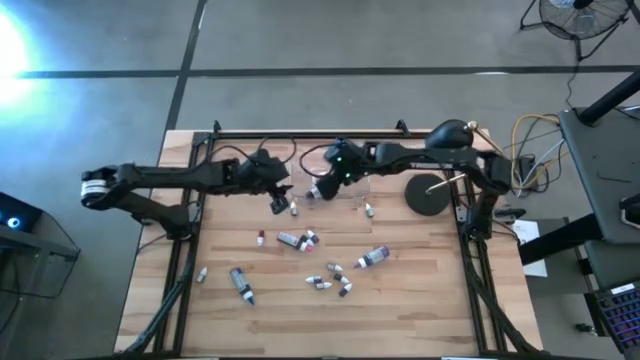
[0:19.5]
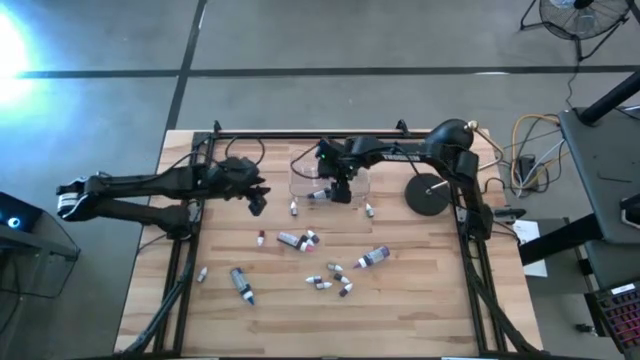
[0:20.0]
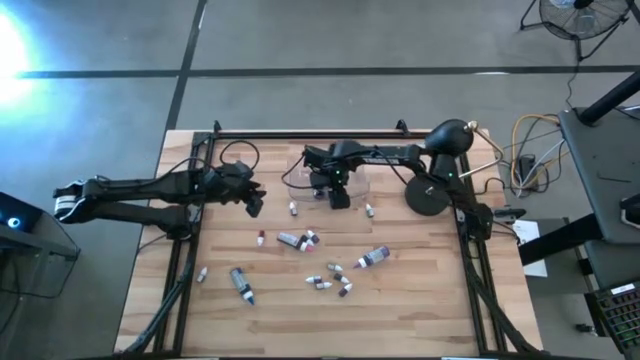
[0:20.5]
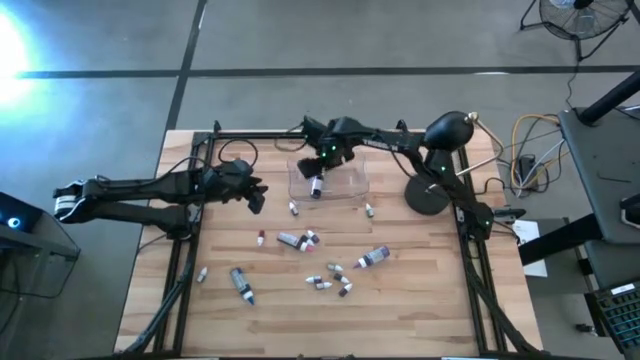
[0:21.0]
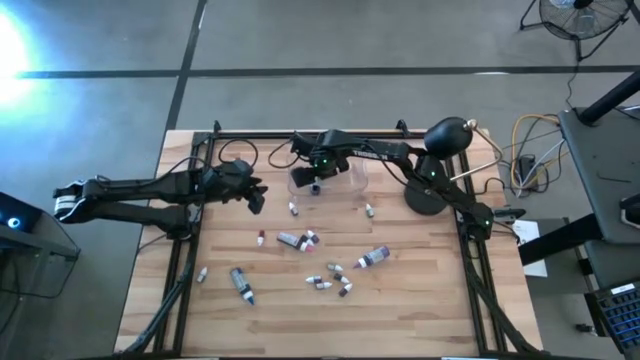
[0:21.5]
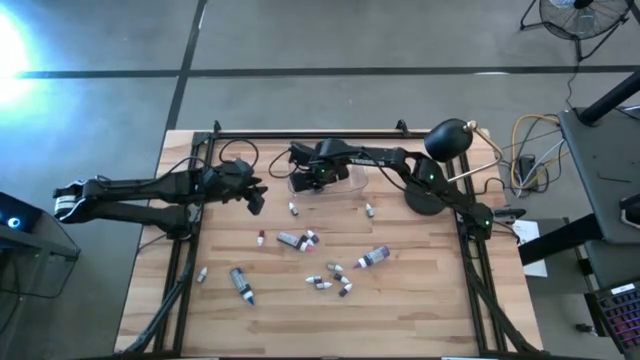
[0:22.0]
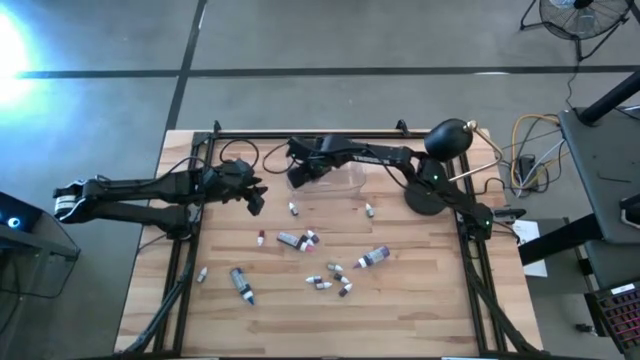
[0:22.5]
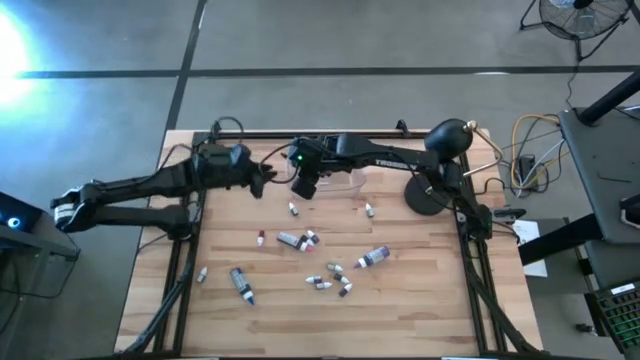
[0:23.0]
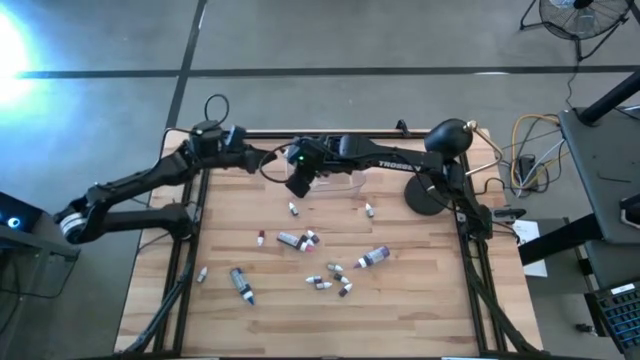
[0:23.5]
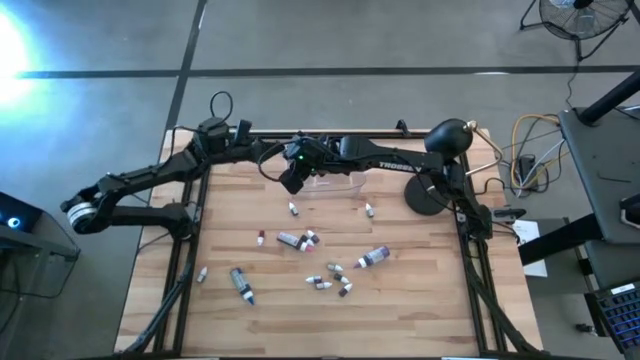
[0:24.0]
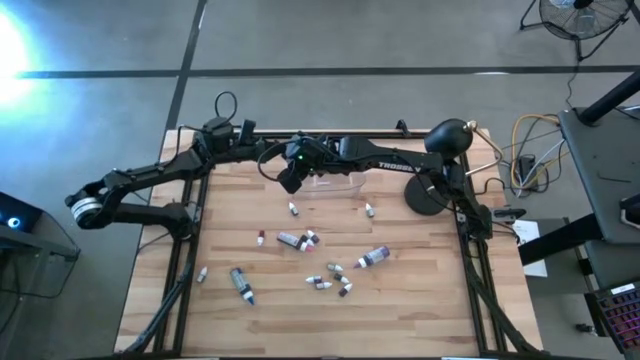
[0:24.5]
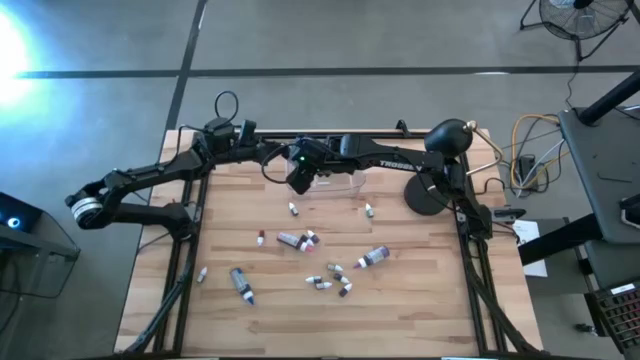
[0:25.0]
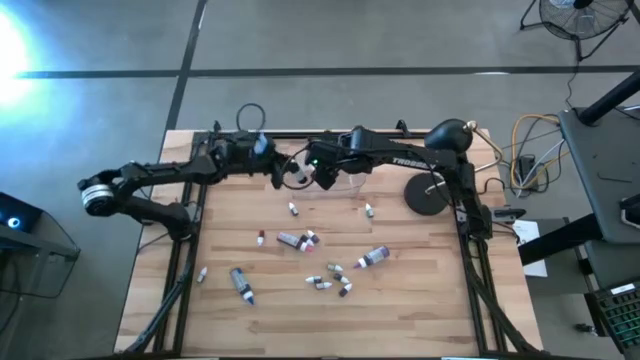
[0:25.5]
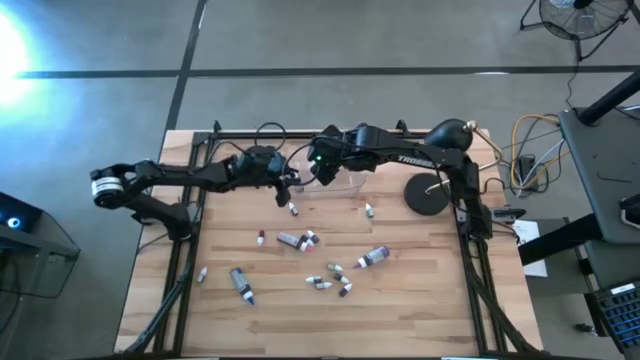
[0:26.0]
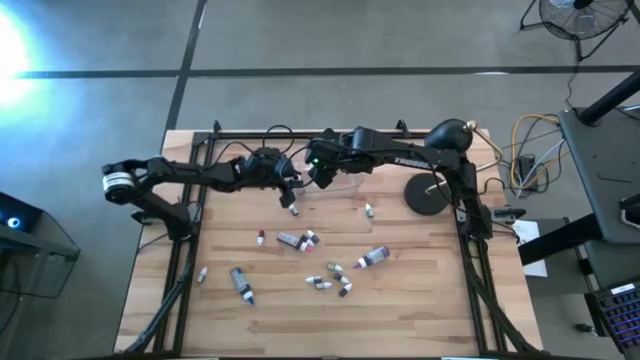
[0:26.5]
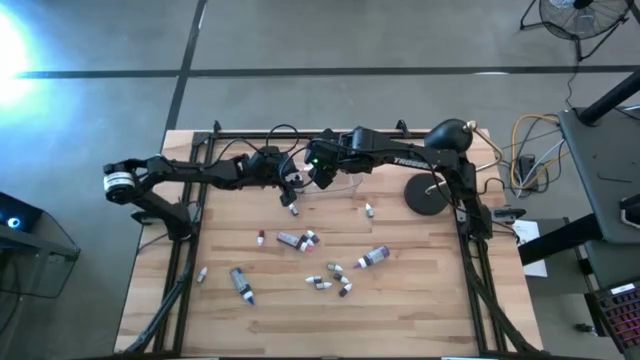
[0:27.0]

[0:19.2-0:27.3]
Task: Pick & Place food coloring
Put the large black food coloring bottle into the transparent bin

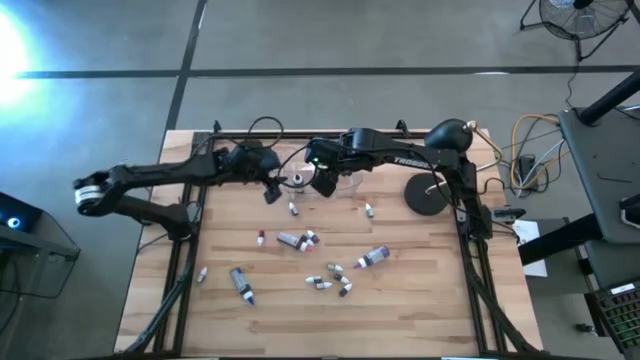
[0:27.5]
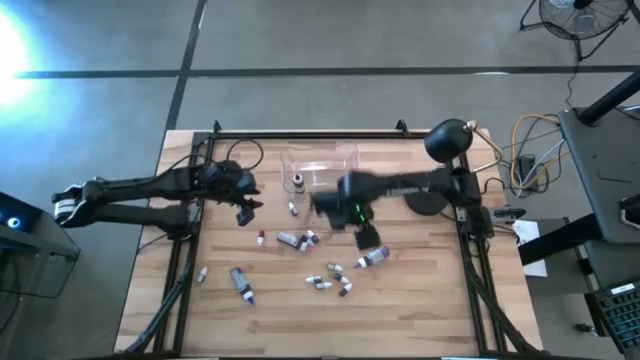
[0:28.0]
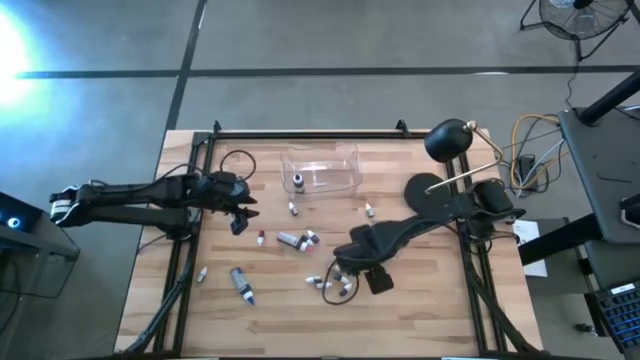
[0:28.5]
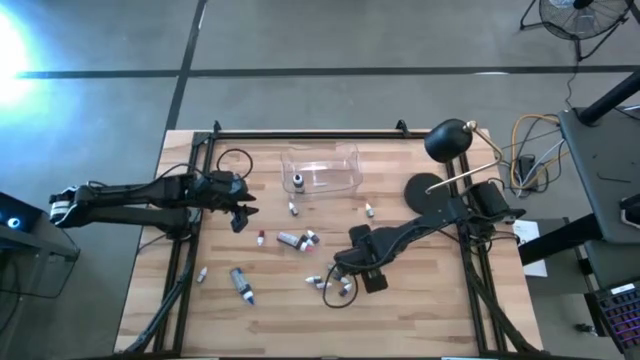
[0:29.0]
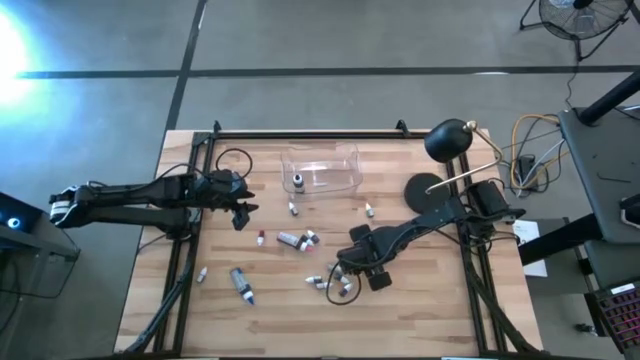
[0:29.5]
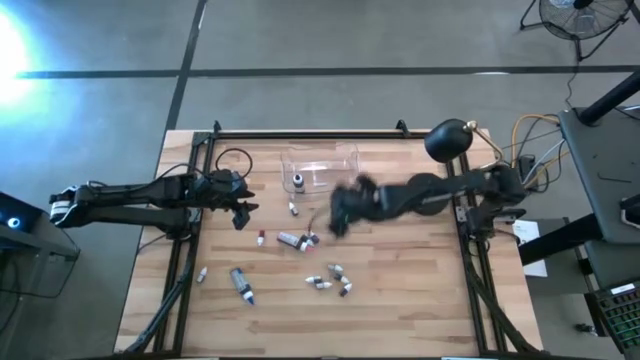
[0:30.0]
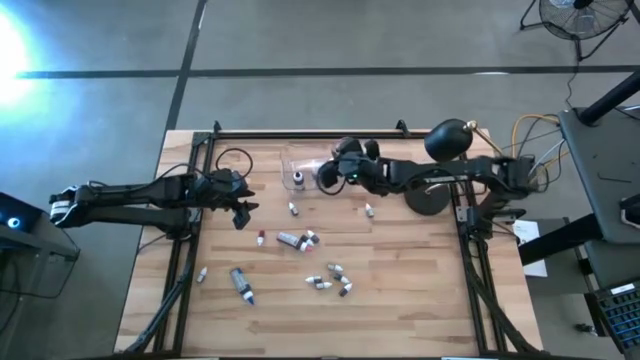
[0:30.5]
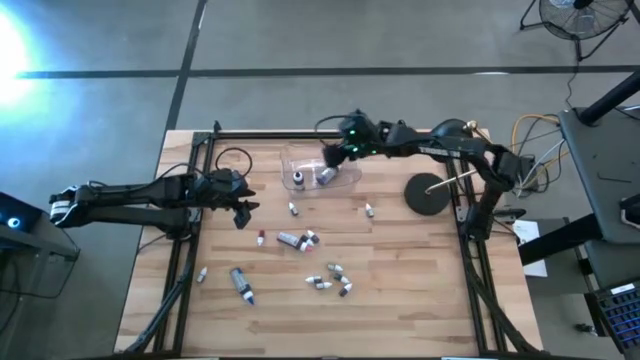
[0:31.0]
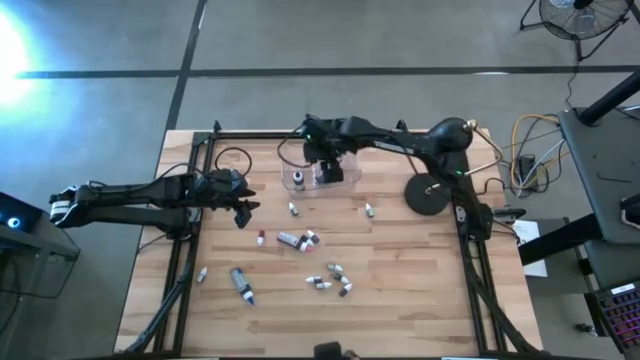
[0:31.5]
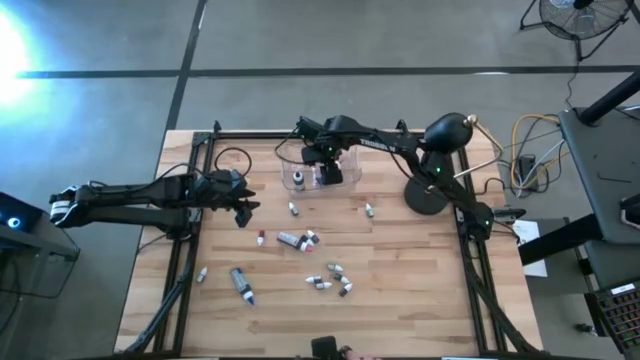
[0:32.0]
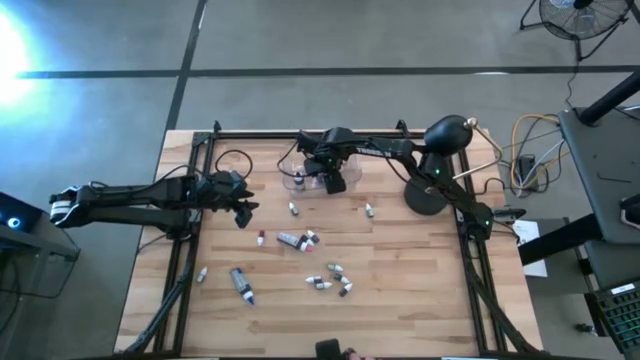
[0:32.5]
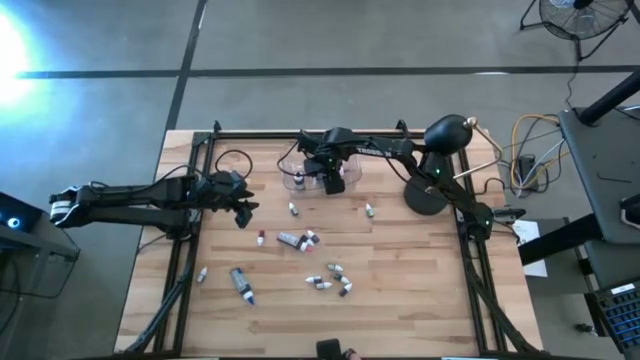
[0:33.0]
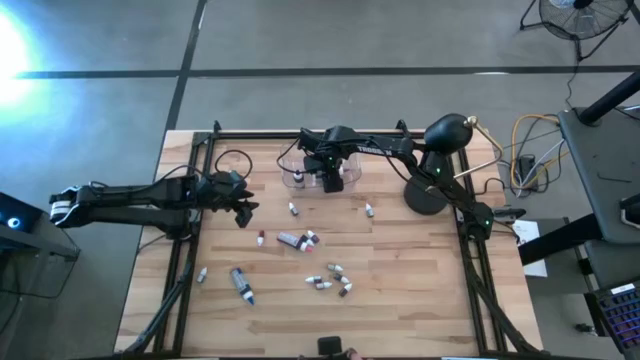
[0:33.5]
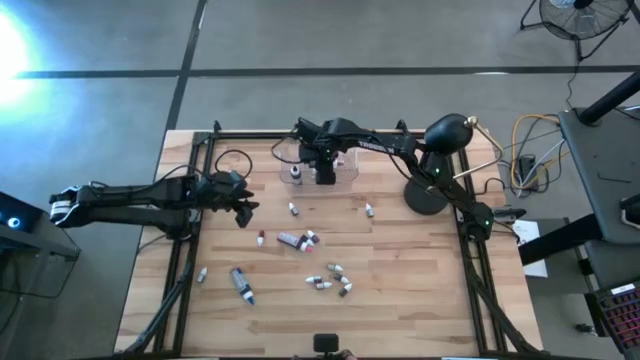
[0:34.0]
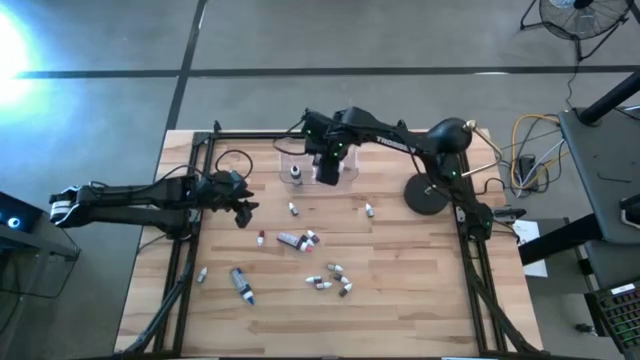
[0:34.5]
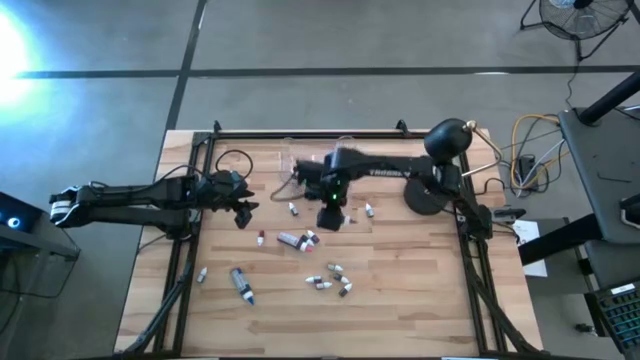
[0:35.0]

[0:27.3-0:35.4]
Put the large purple food coloring bottle into the transparent bin

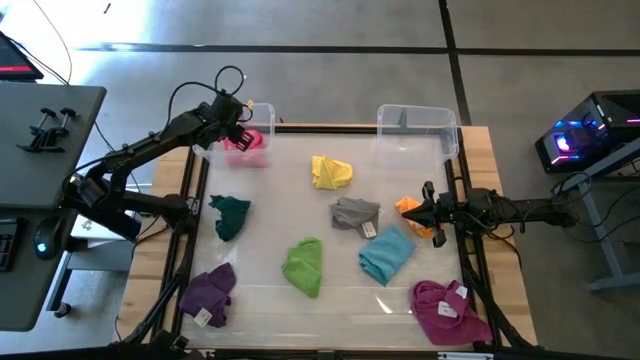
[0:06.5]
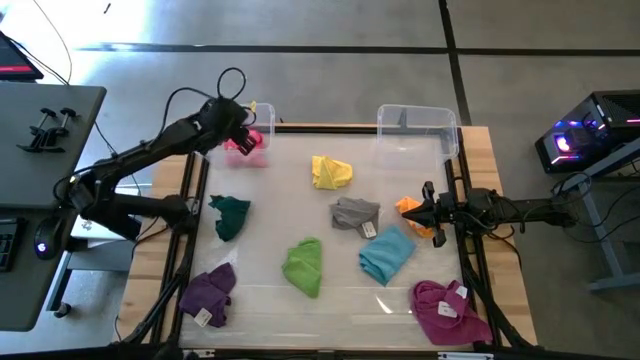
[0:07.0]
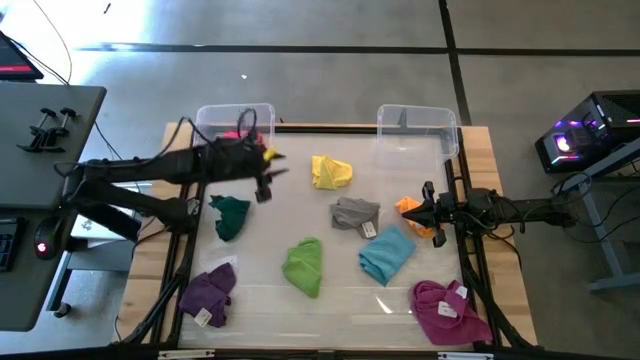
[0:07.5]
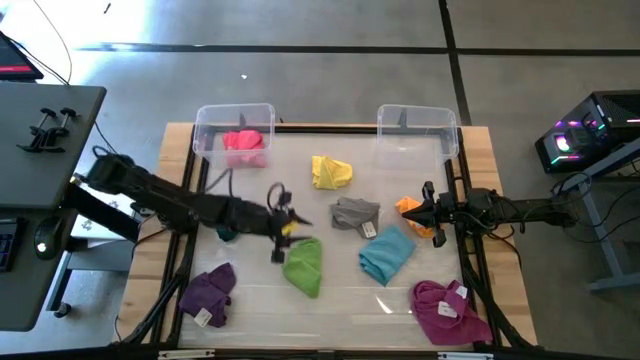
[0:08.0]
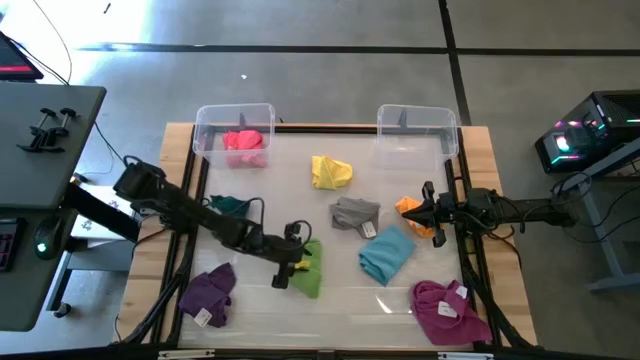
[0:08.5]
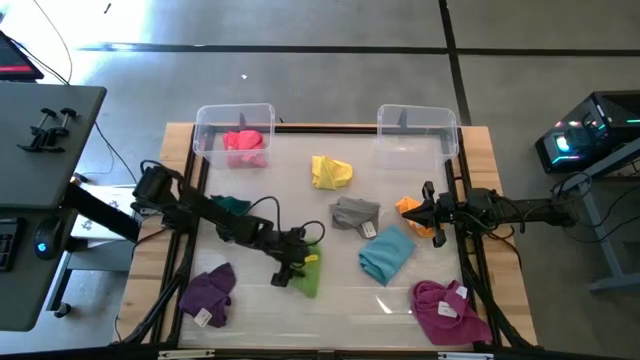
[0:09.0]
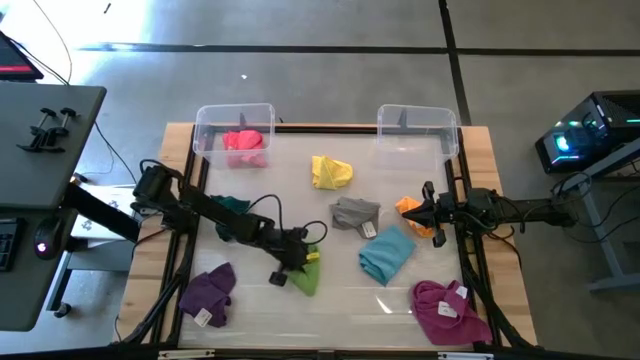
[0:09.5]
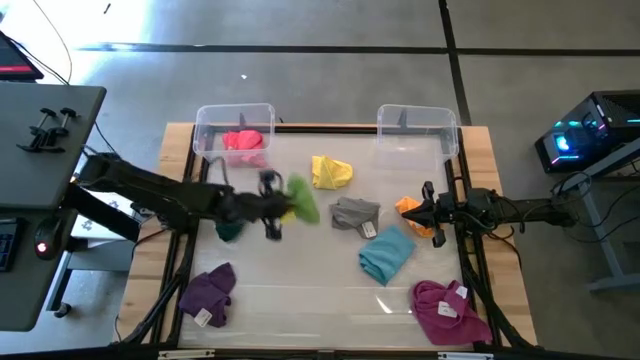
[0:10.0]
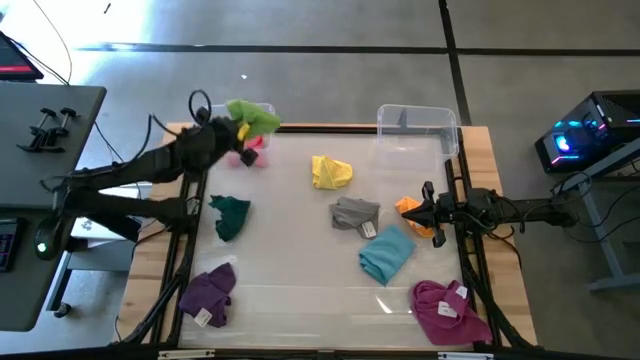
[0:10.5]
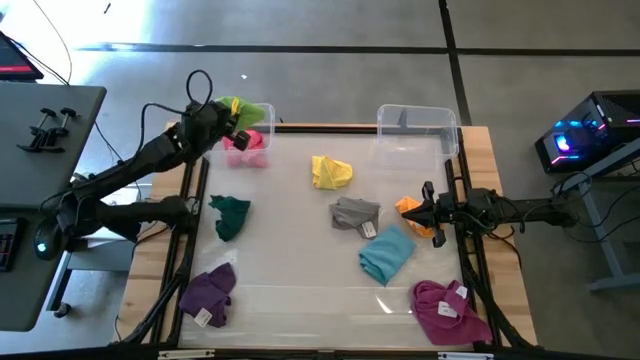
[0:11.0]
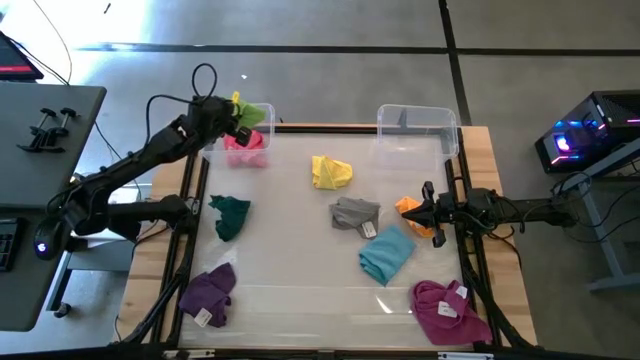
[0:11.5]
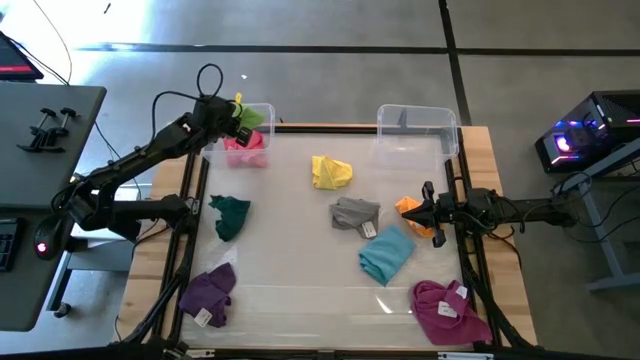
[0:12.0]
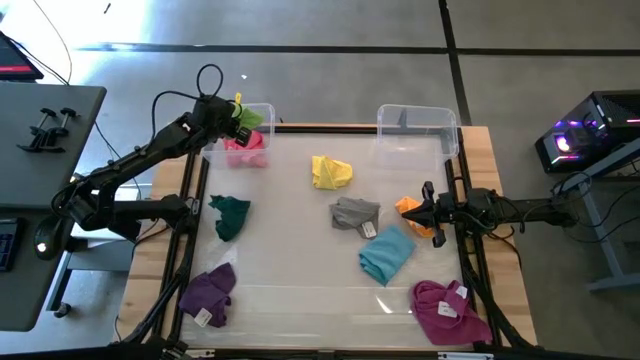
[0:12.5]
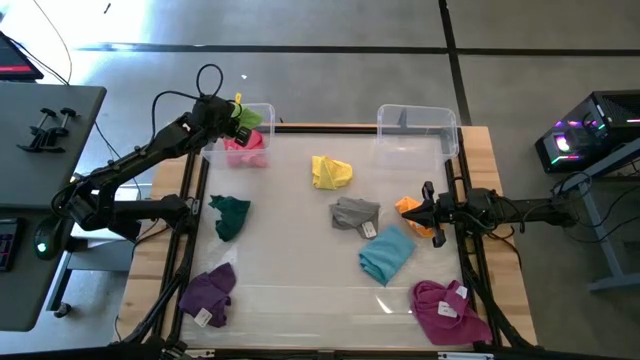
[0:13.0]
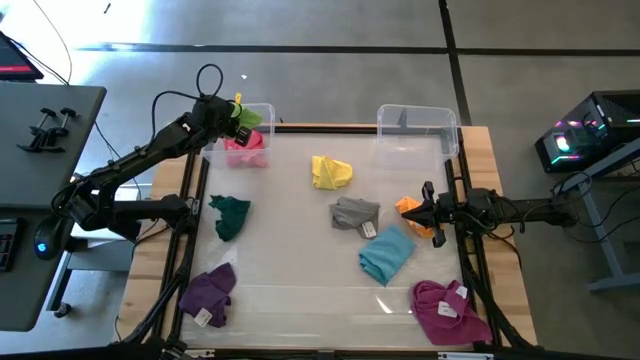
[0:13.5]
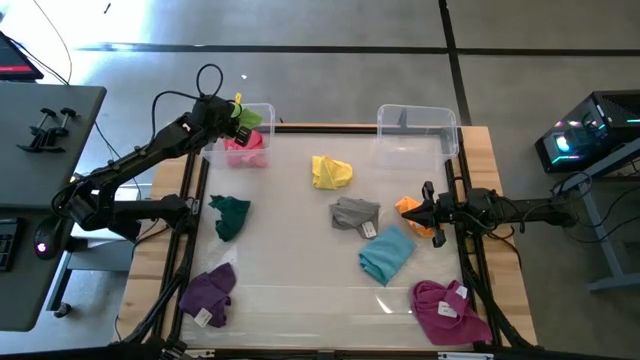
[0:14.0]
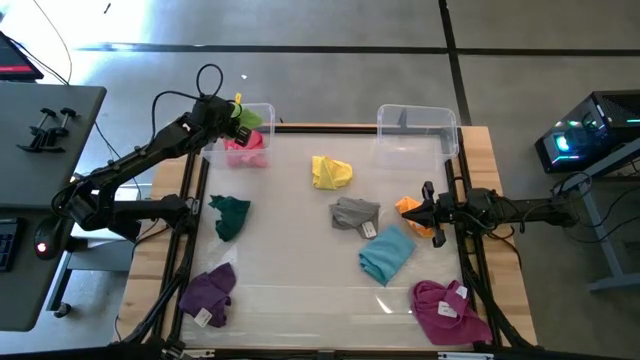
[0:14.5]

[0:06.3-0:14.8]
Task: Sort towels by color in basket
Put the light green microfiber cloth into the left transparent bin
